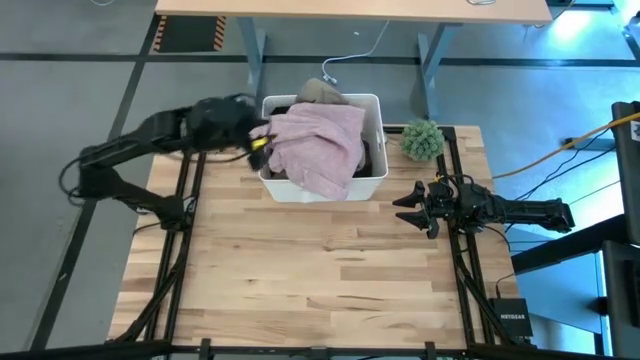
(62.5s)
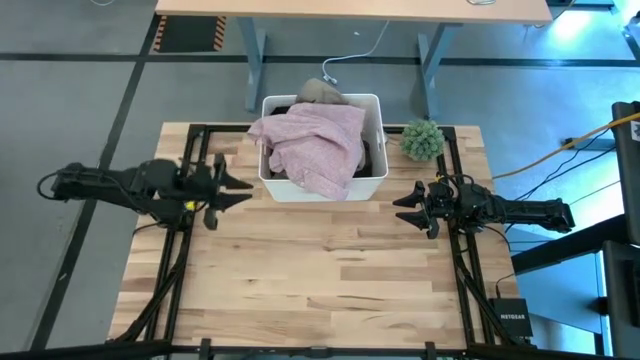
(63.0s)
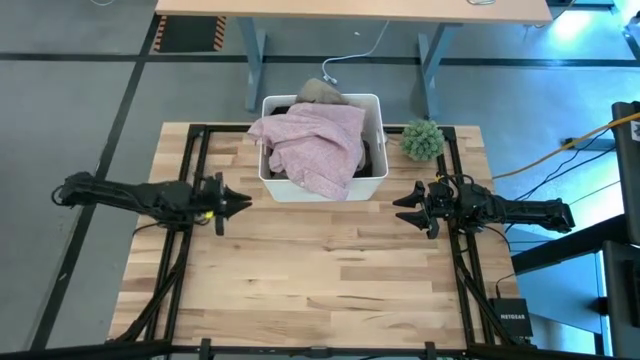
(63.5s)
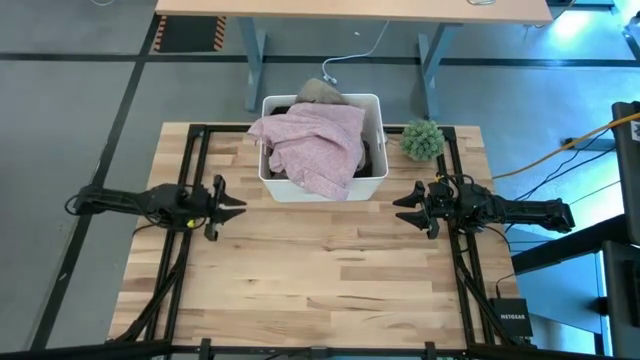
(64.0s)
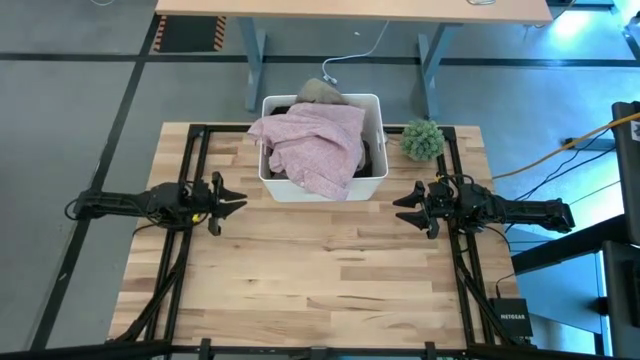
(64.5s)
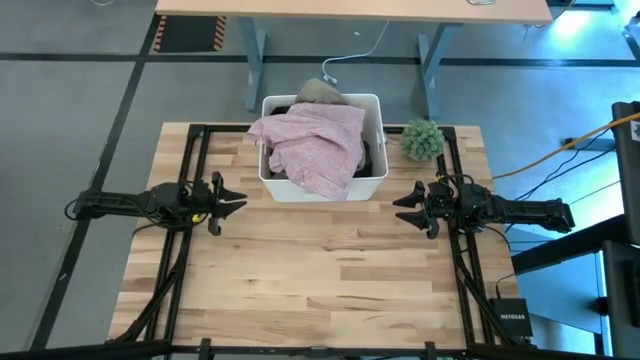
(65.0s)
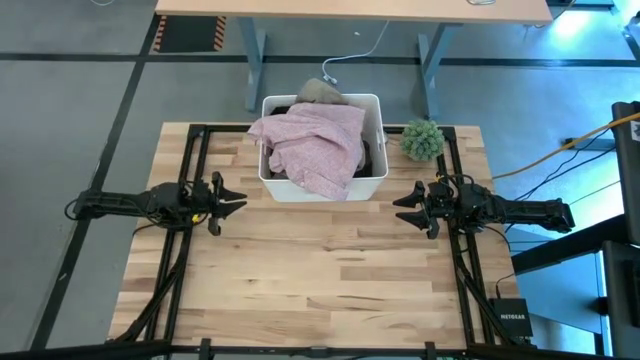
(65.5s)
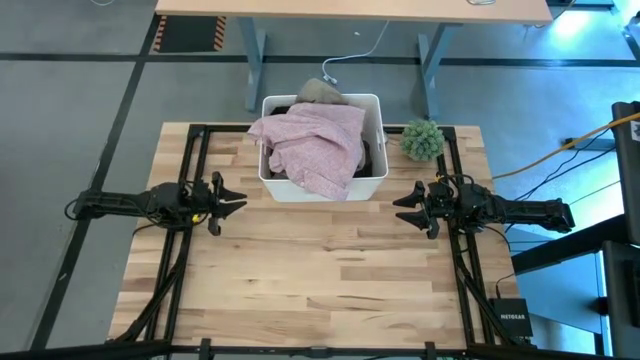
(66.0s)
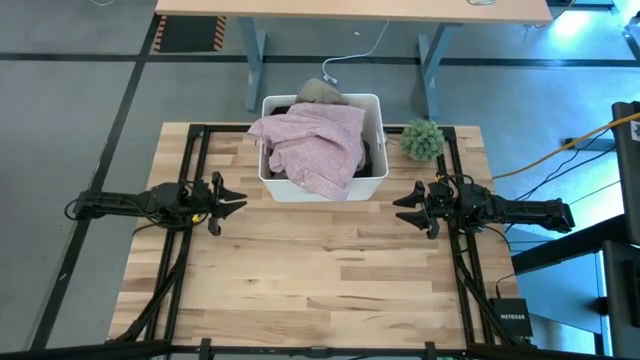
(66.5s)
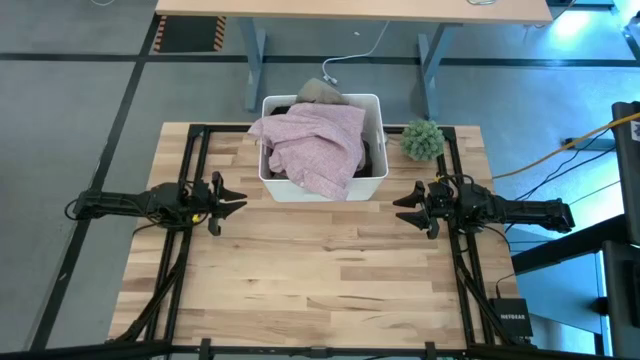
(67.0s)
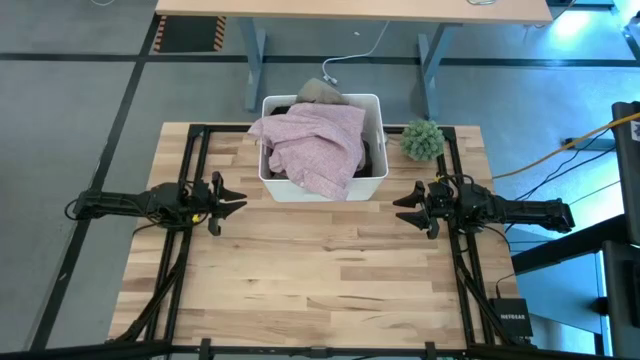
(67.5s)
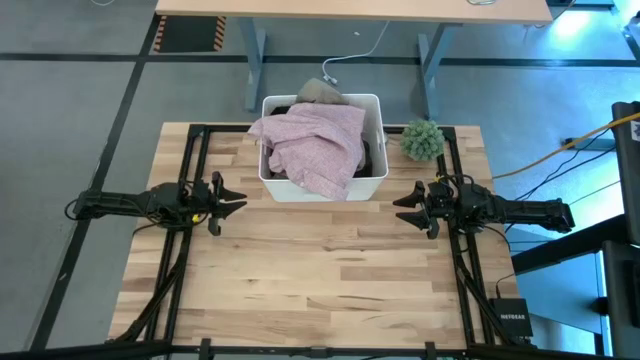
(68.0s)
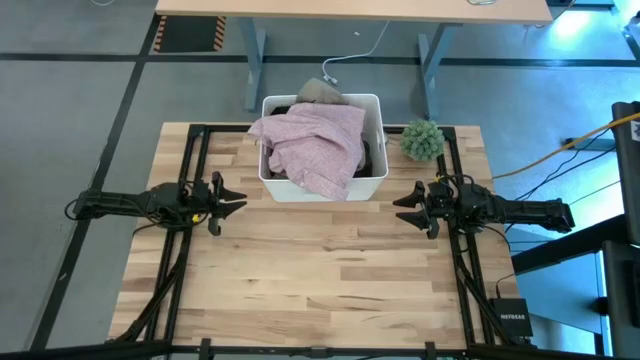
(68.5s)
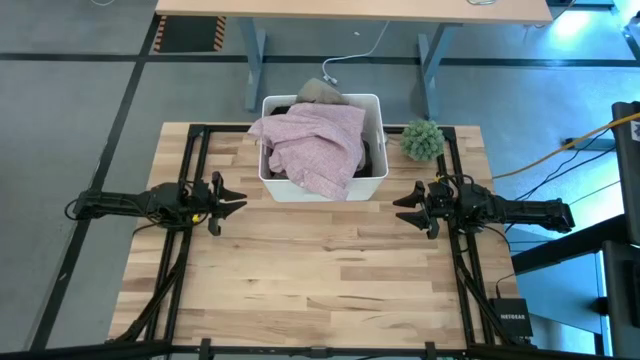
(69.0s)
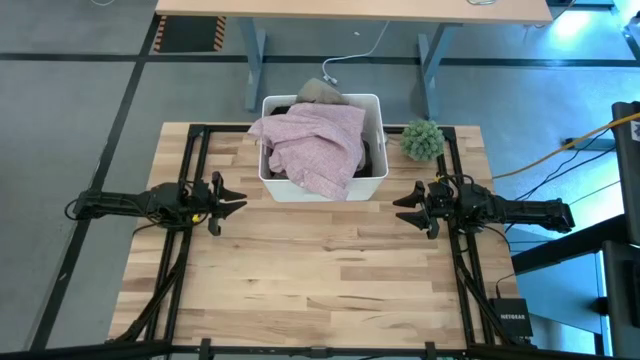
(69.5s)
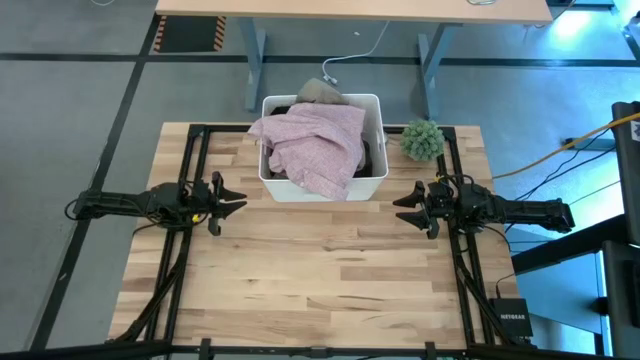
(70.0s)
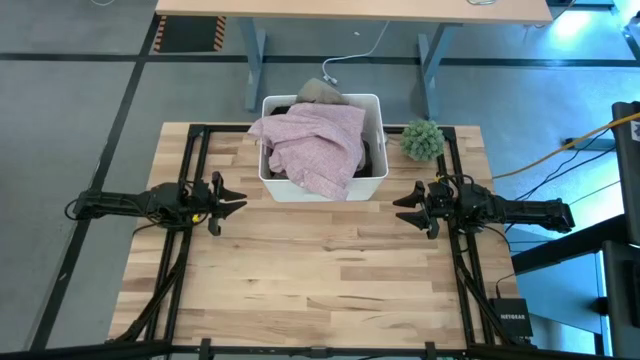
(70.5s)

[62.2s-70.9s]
Task: Sort clothes
Return to Home Position

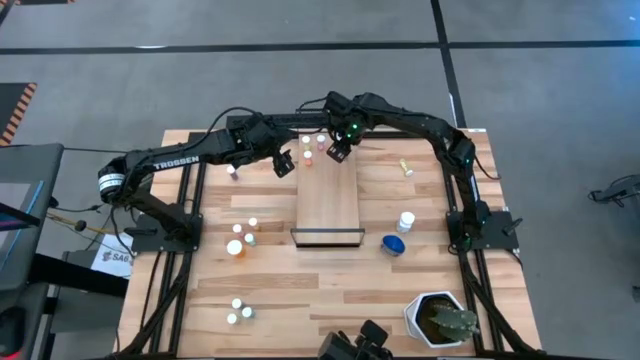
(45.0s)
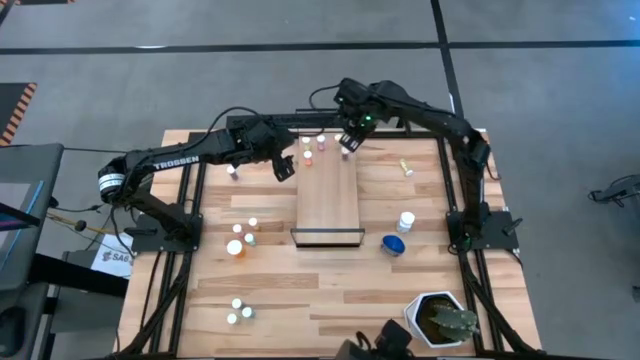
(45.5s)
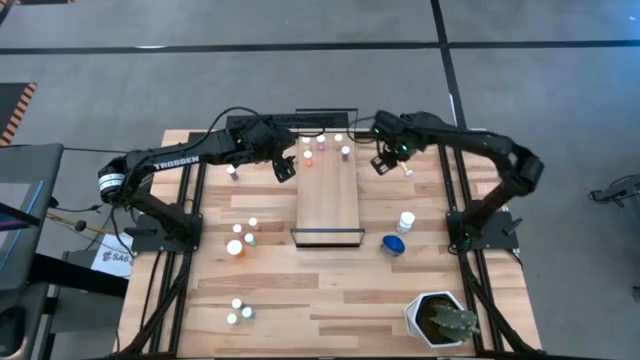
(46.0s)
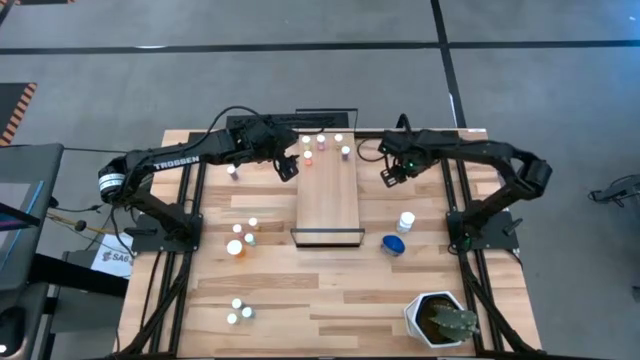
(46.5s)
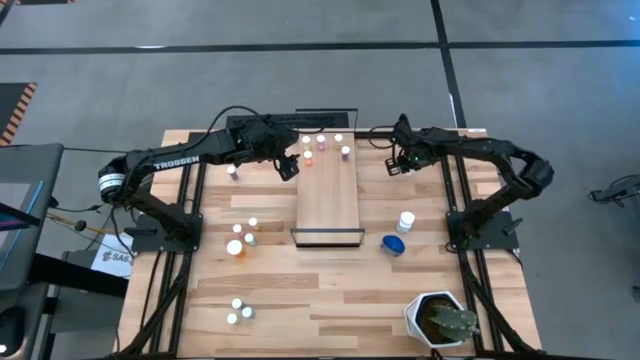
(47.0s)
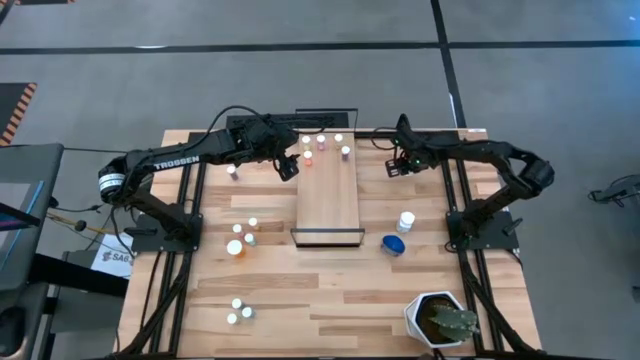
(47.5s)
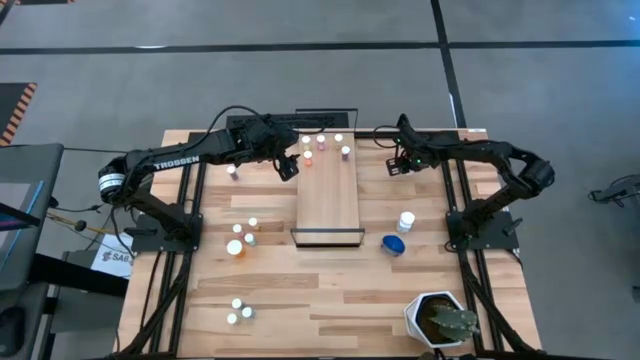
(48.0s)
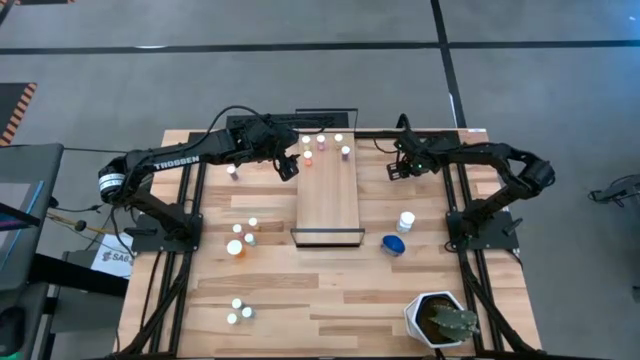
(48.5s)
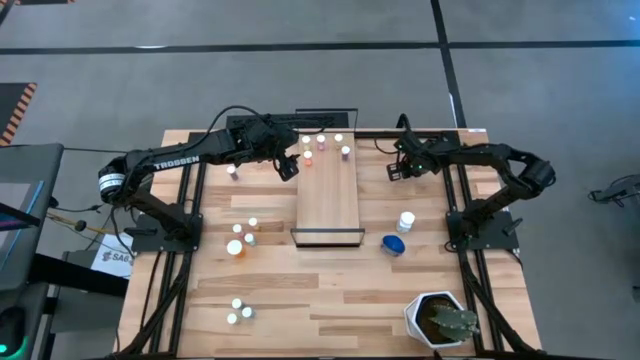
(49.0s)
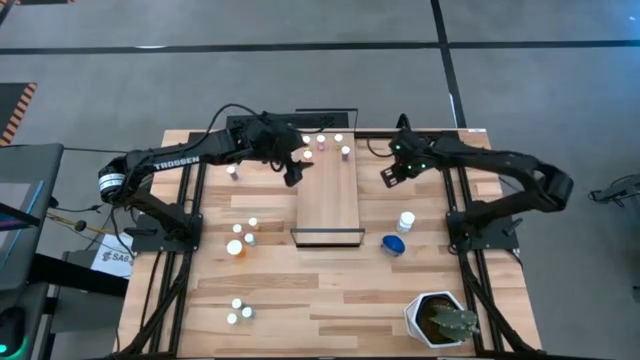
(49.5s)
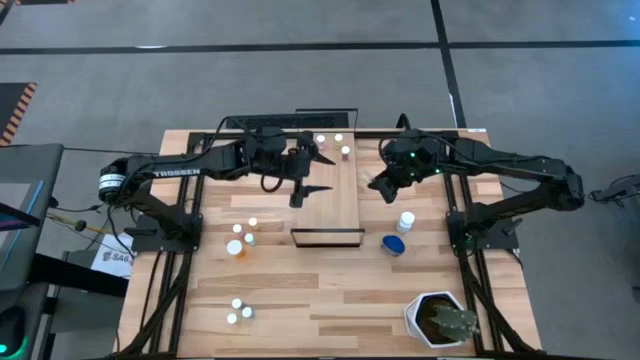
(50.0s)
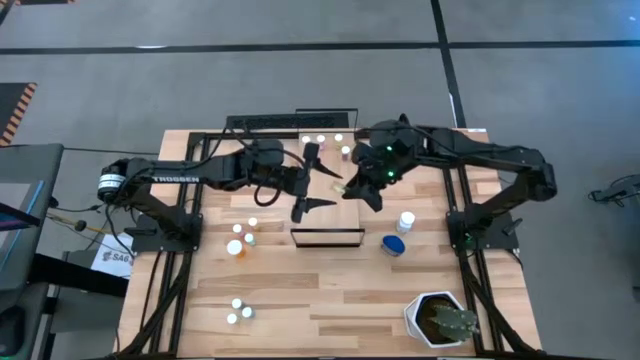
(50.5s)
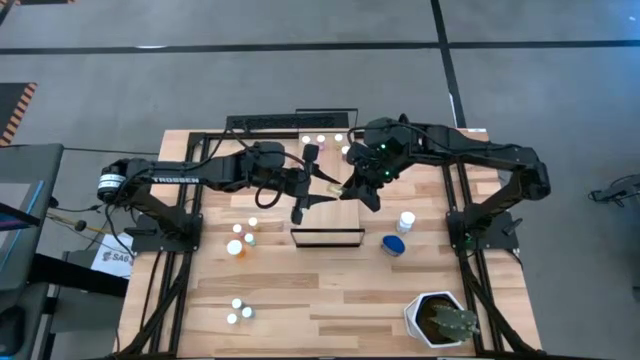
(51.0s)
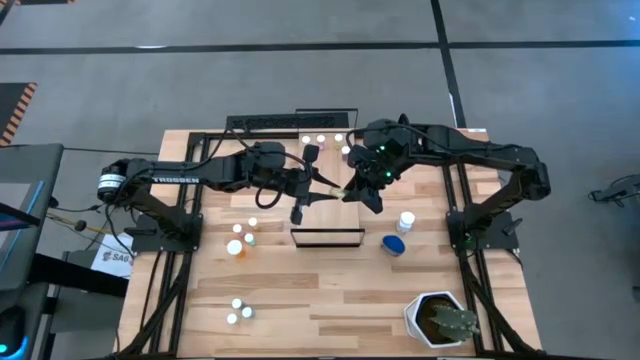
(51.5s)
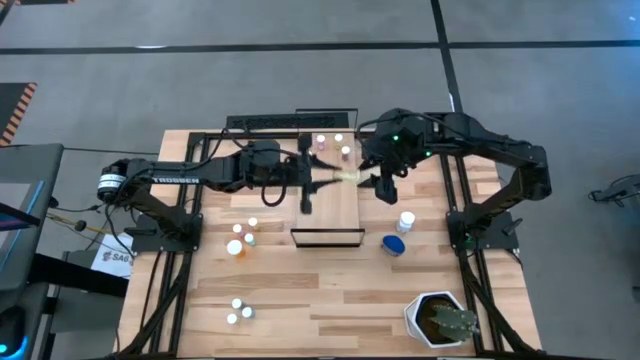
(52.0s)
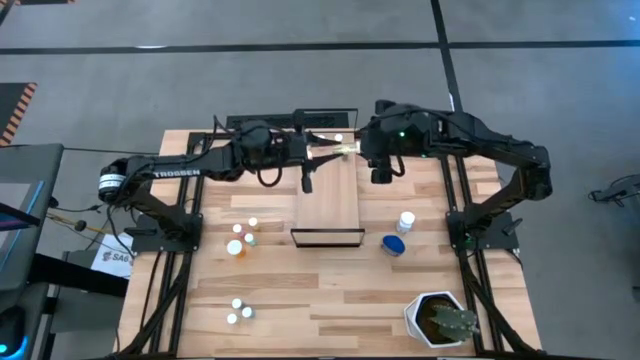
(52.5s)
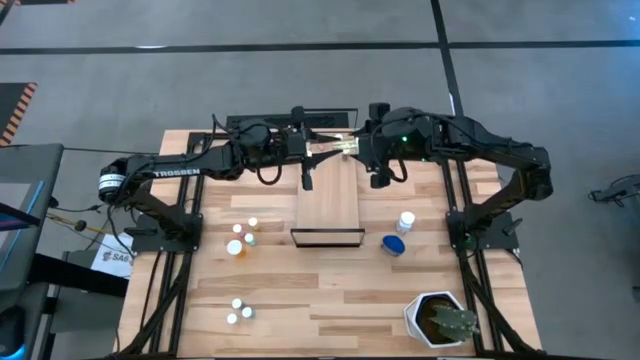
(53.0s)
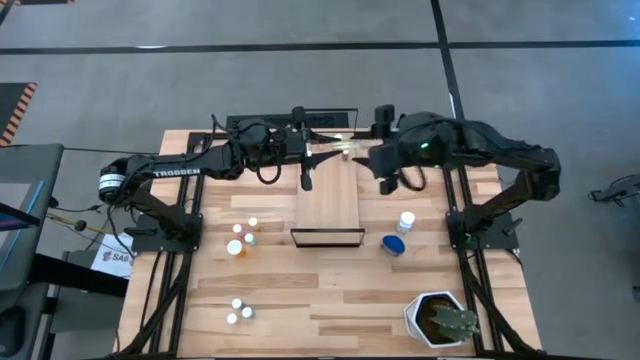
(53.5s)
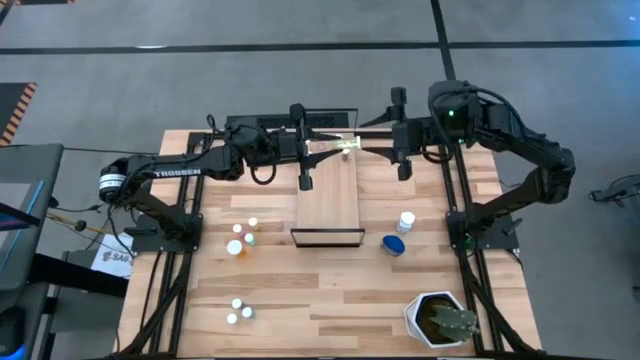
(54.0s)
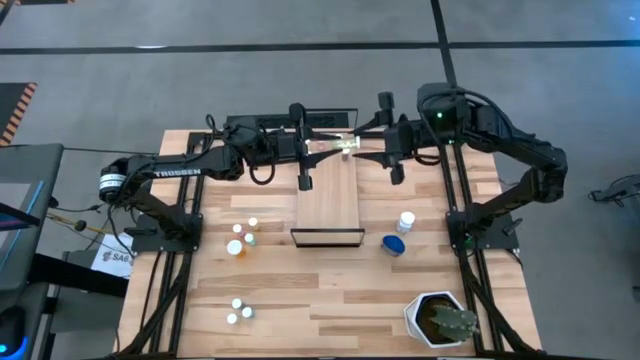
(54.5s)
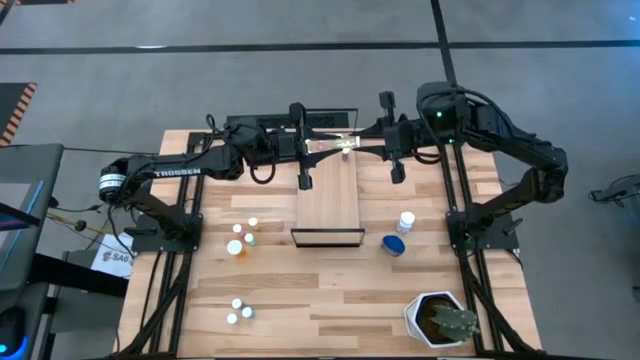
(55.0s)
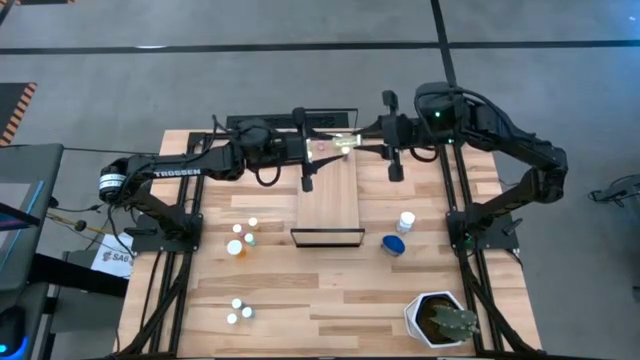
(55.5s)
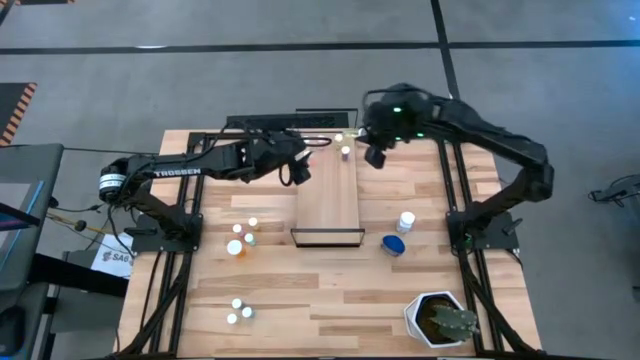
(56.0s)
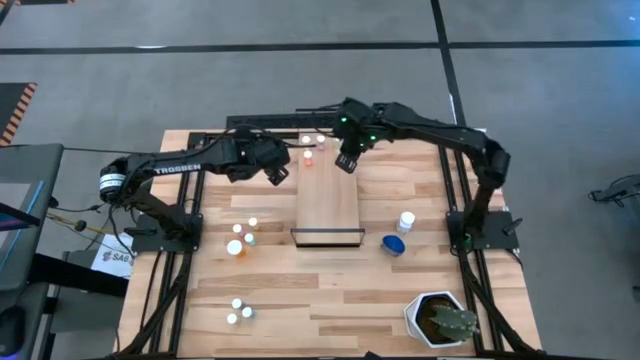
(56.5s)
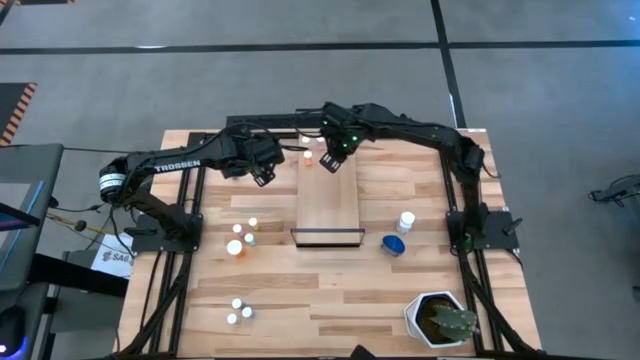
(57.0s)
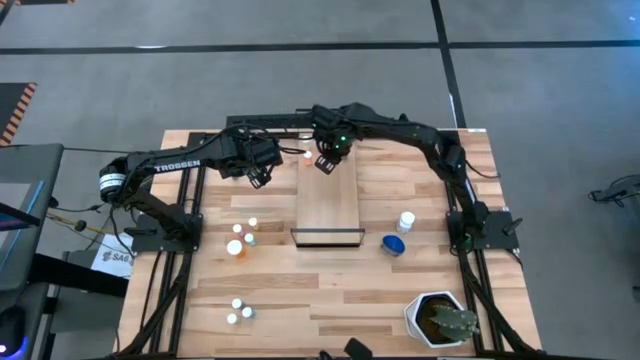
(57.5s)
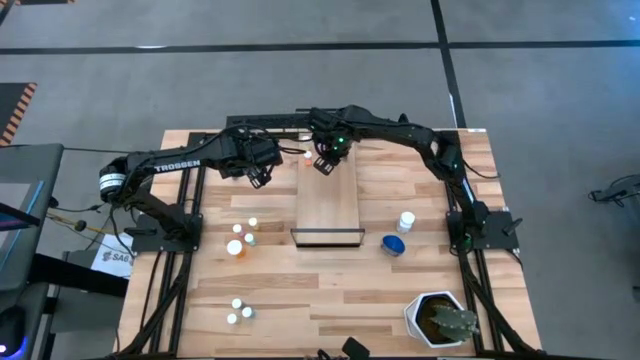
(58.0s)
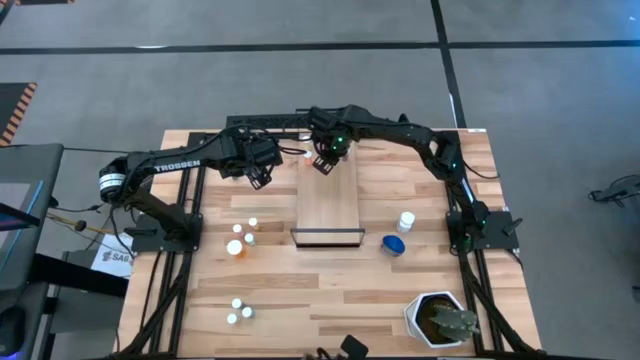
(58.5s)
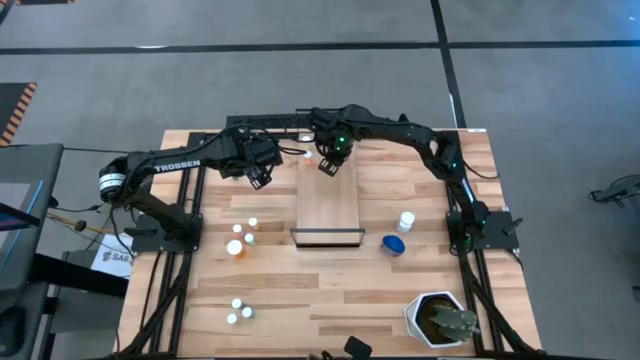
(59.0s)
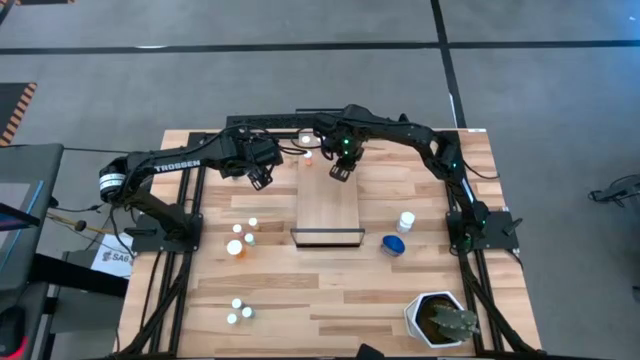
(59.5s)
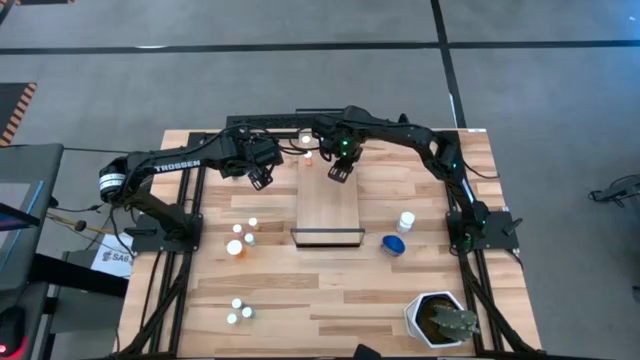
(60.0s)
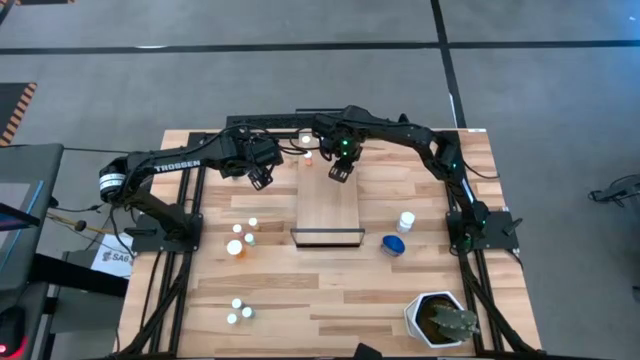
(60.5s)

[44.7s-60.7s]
Task: Pick and place medicine bottles onto shelf by color
Put the yellow pill bottle on the shelf
